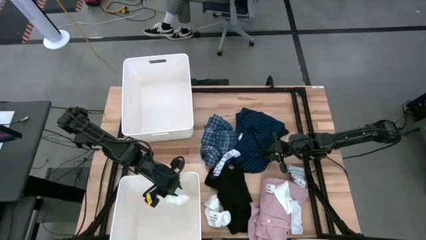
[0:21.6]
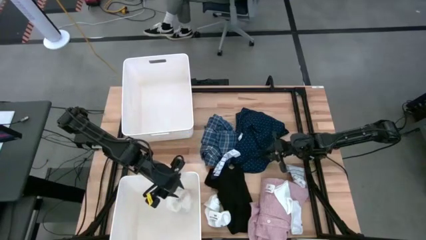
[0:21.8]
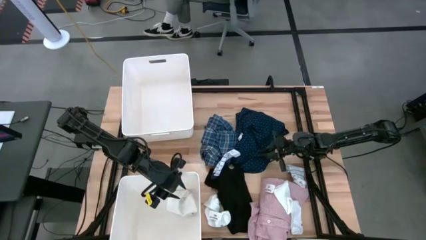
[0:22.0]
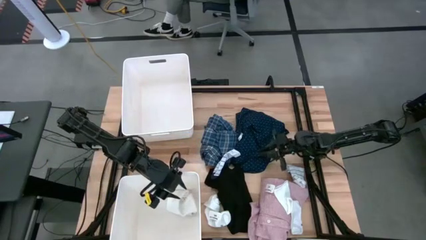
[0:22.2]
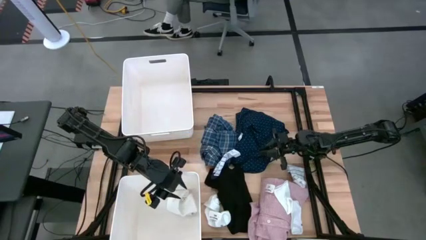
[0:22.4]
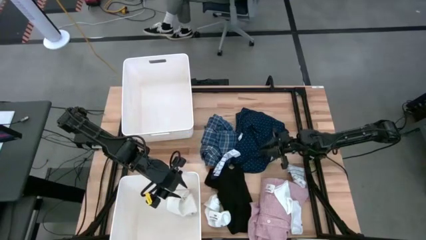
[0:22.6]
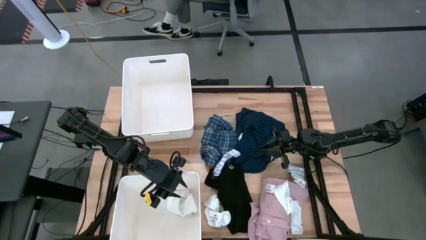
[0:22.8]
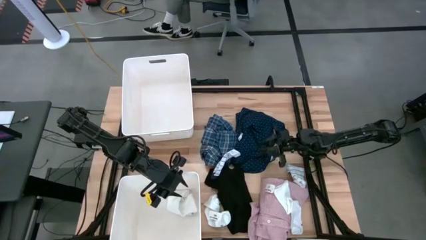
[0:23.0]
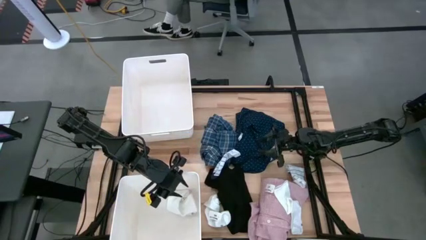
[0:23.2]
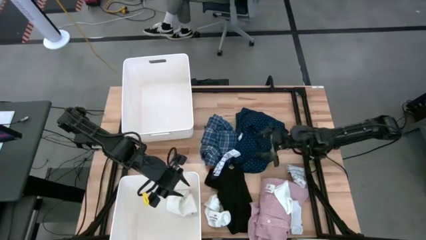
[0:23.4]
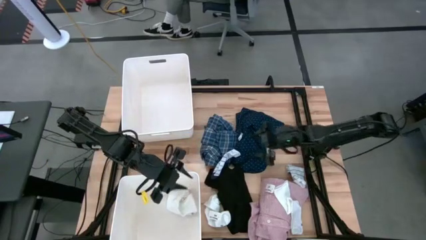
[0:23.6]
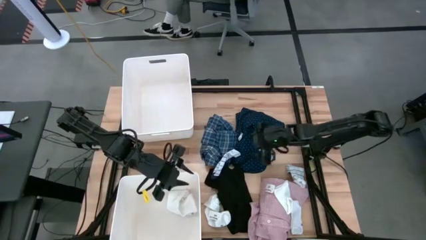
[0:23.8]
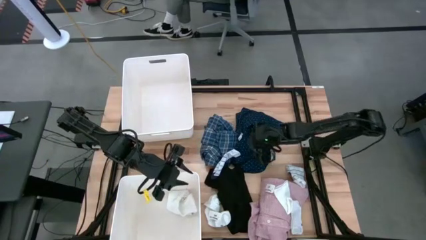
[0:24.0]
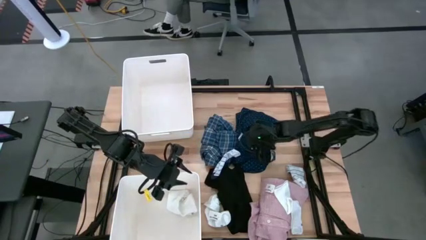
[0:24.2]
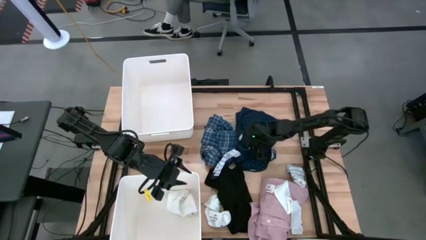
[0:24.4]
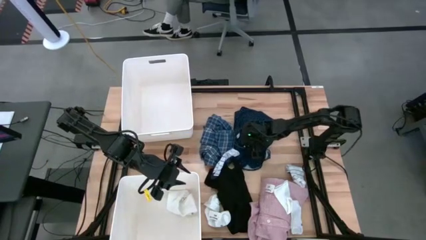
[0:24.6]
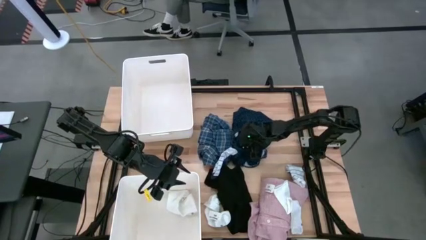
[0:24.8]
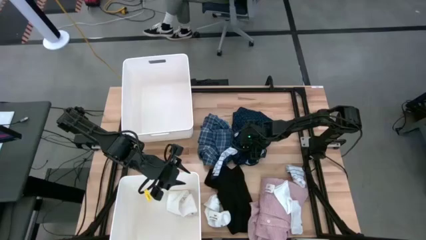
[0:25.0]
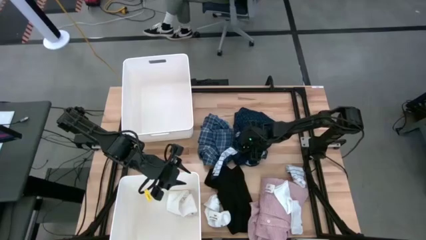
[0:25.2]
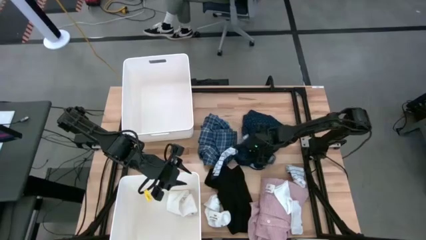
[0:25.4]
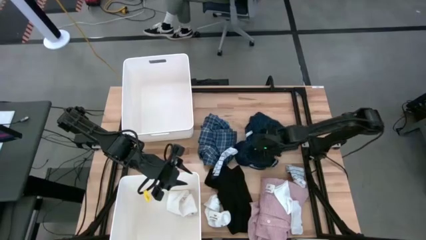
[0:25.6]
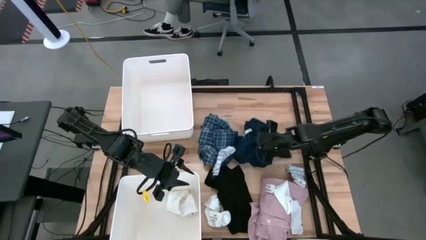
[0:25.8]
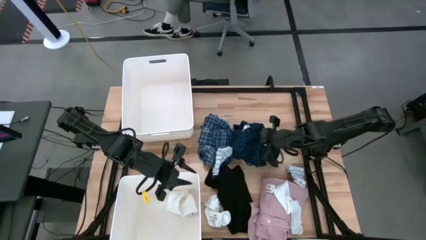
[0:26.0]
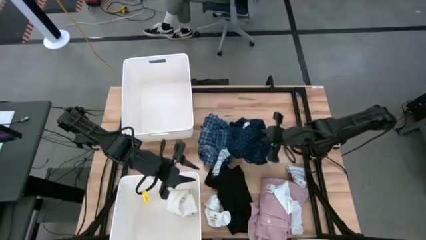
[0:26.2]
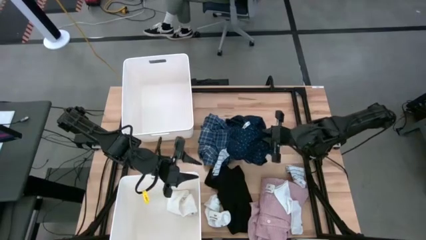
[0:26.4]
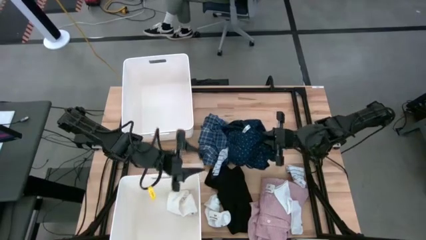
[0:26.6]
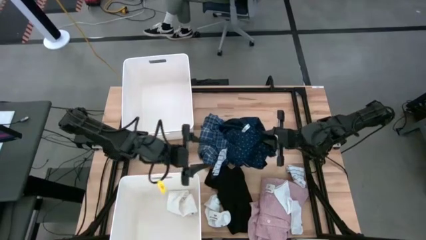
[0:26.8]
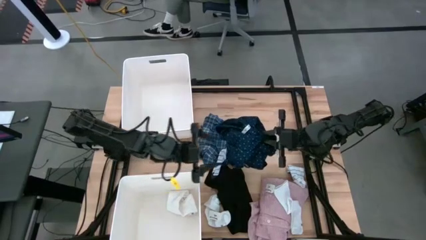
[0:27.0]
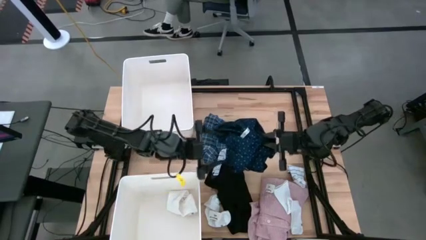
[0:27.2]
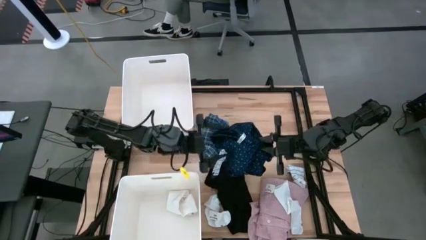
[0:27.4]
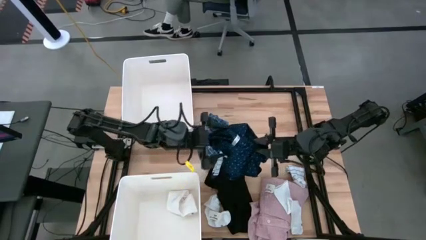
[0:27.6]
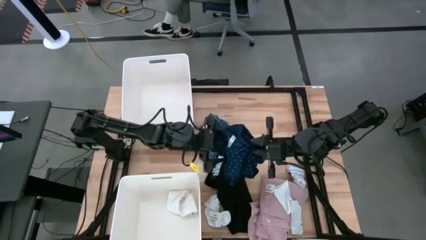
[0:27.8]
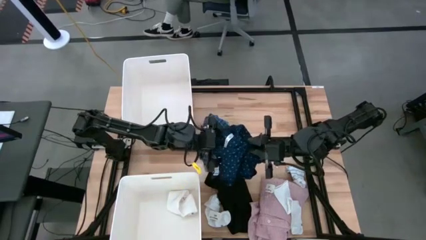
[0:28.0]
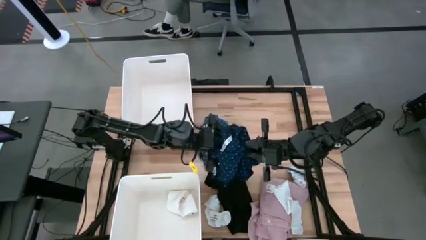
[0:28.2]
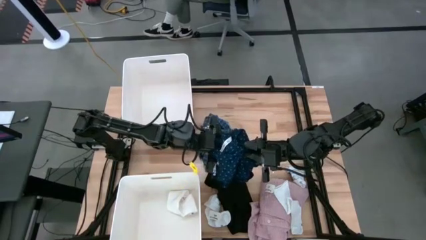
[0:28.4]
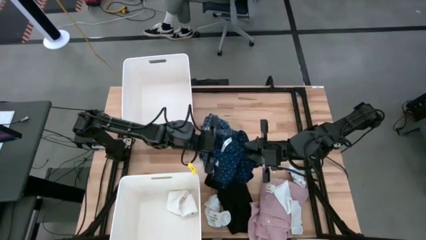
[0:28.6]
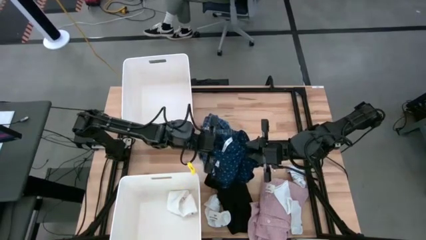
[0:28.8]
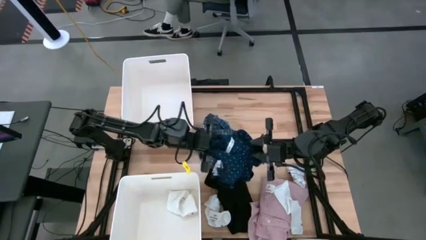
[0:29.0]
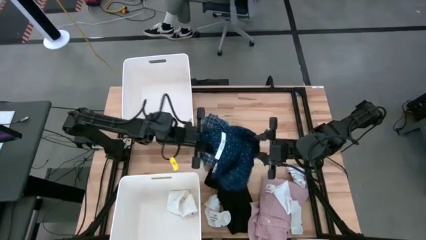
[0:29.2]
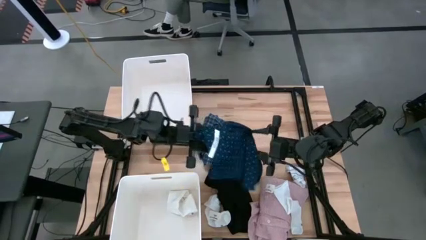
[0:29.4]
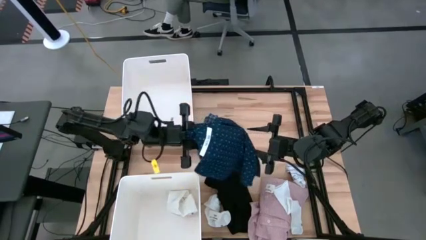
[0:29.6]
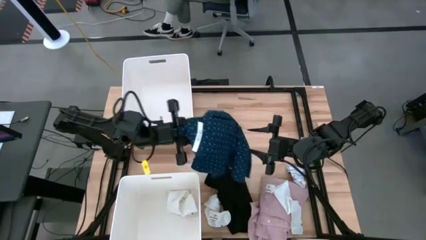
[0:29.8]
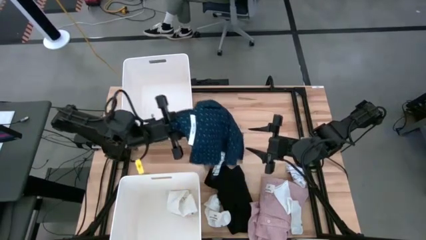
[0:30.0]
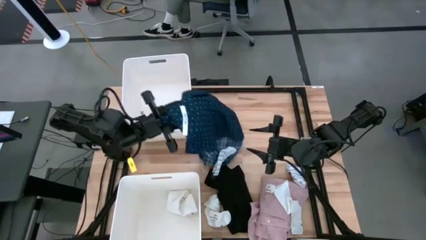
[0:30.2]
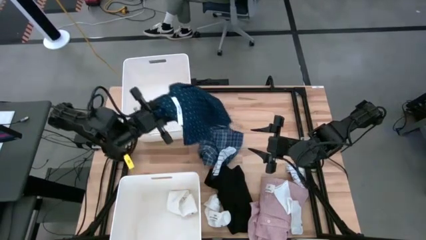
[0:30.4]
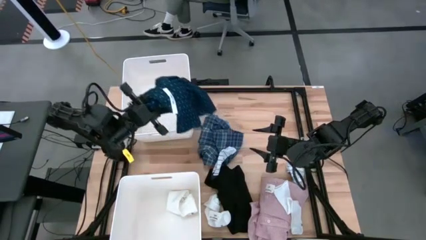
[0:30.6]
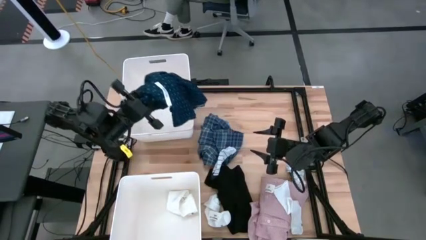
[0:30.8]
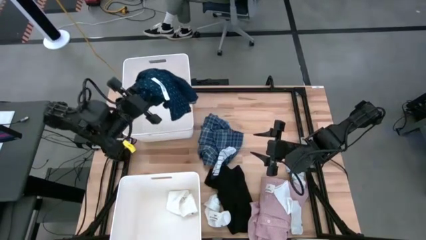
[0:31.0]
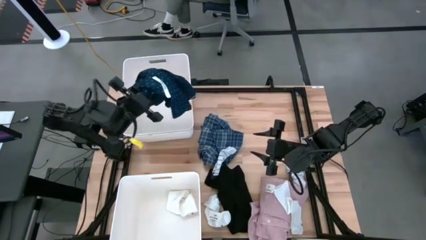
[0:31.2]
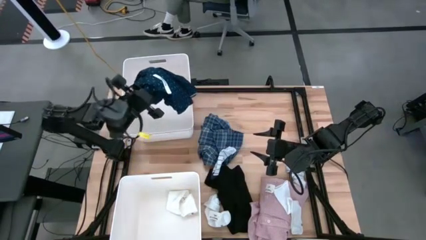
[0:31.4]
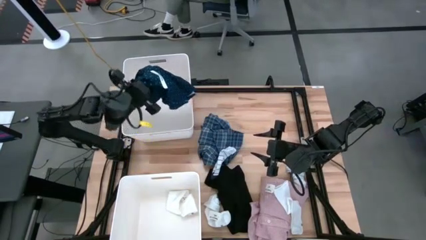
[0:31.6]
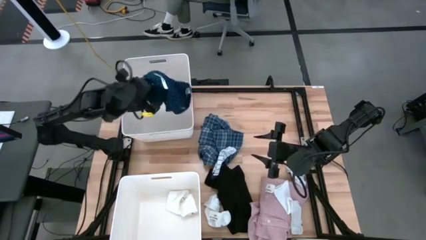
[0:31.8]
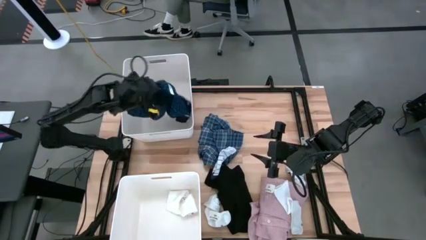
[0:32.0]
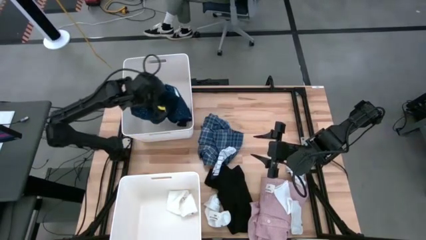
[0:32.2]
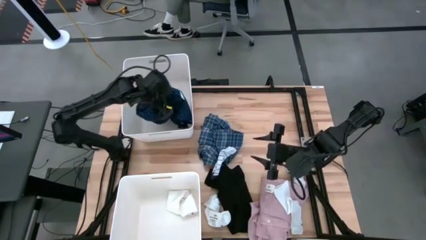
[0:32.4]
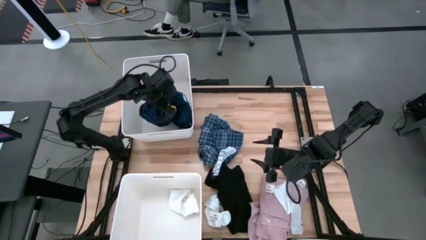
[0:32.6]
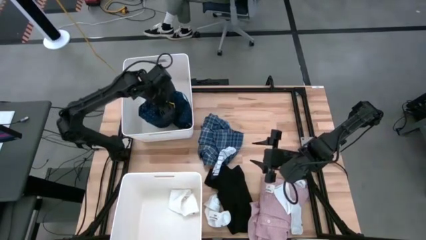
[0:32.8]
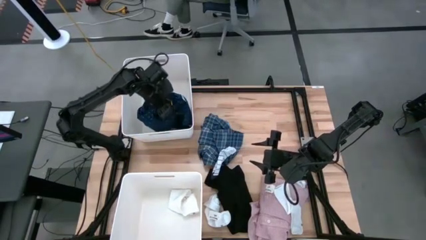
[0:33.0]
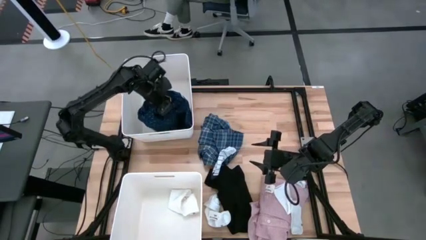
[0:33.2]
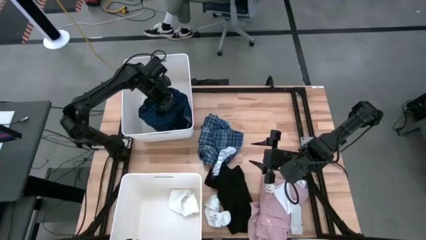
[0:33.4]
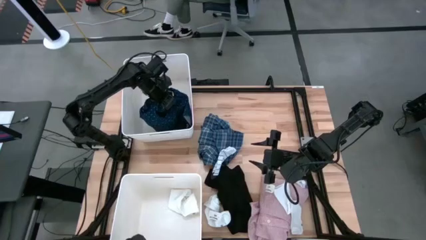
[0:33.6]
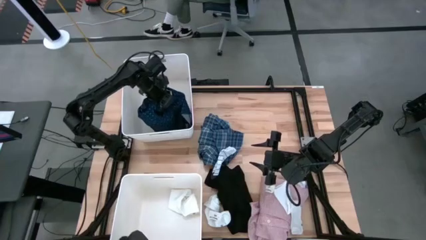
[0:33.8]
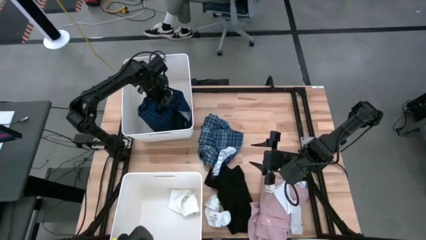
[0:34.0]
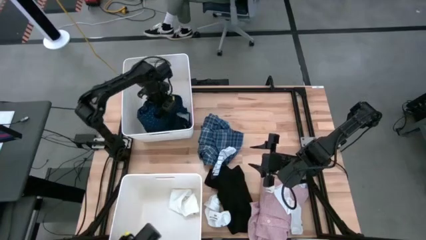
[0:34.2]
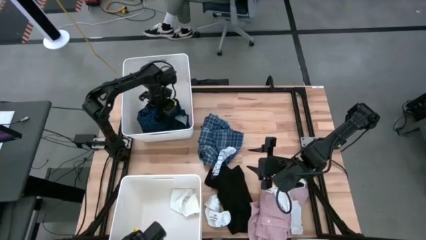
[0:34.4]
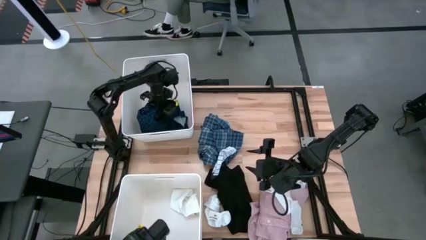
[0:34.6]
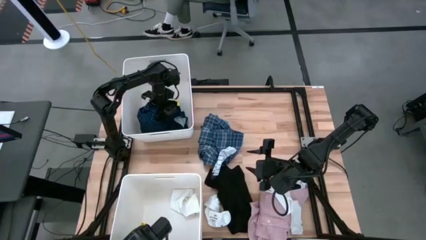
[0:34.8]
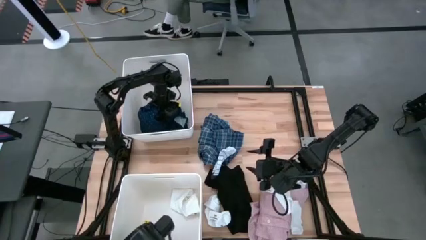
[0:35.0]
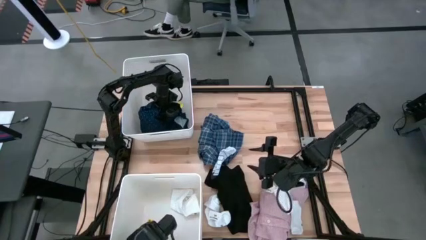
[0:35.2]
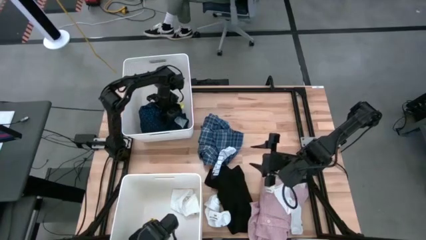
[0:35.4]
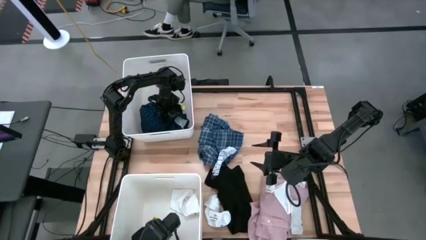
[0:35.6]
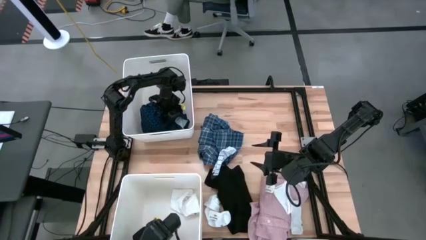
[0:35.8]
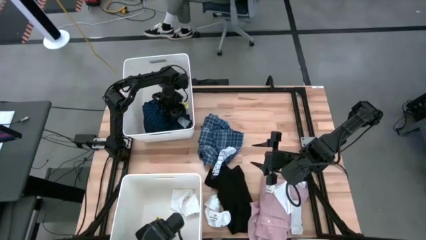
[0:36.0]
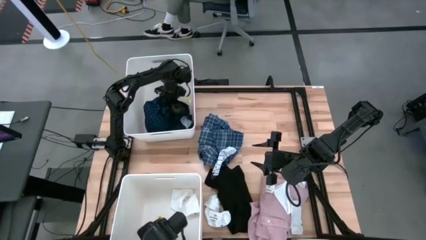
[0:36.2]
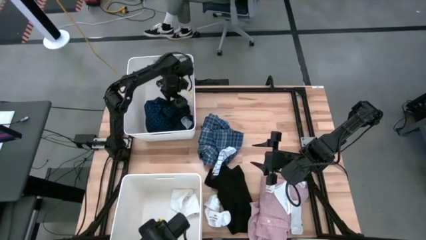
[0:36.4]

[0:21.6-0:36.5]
Task: Sort clothes
Put the blue shirt into the top white laundry organizer
